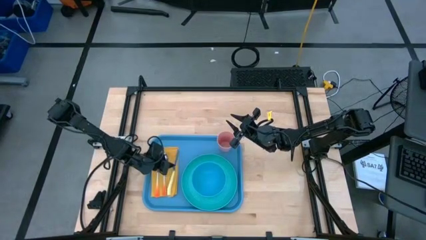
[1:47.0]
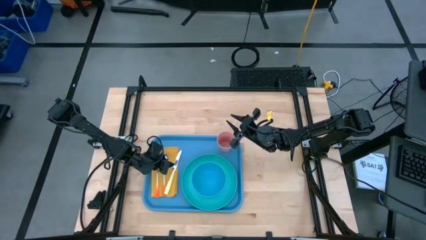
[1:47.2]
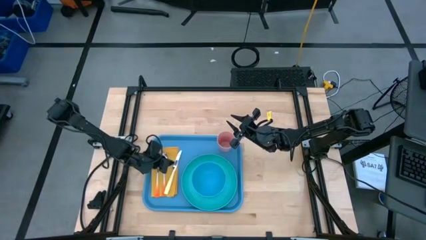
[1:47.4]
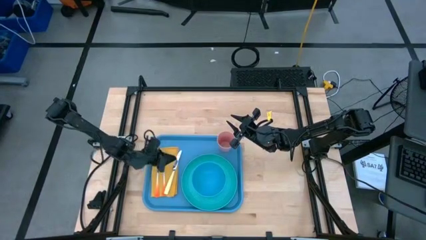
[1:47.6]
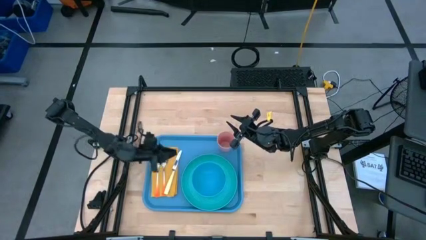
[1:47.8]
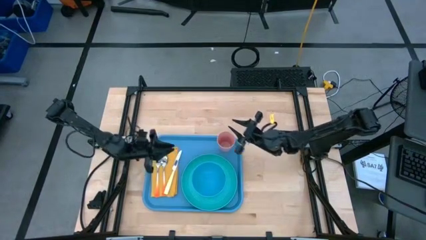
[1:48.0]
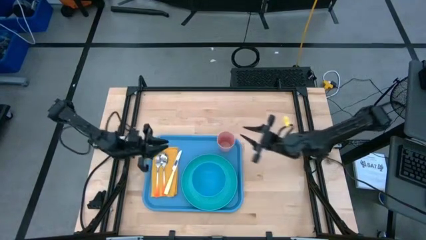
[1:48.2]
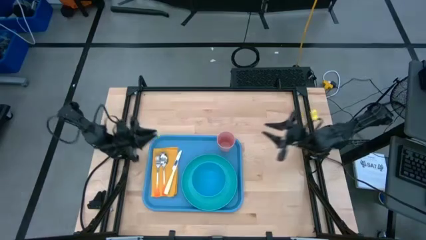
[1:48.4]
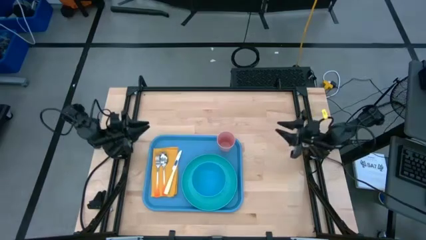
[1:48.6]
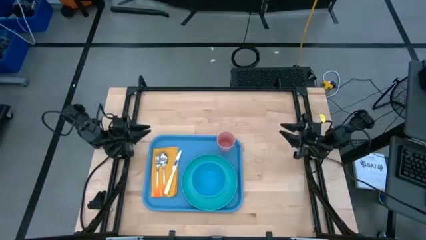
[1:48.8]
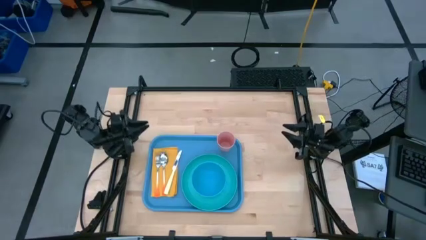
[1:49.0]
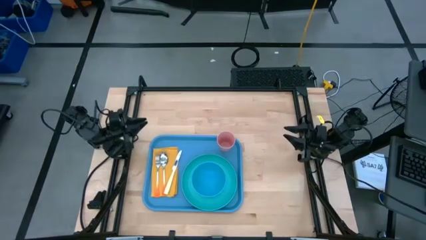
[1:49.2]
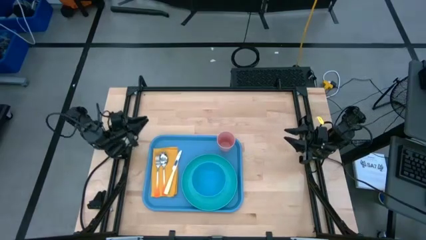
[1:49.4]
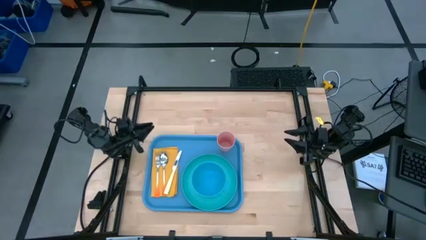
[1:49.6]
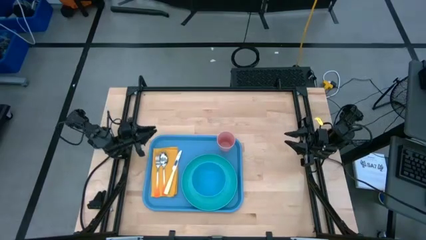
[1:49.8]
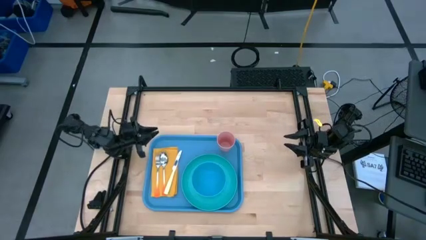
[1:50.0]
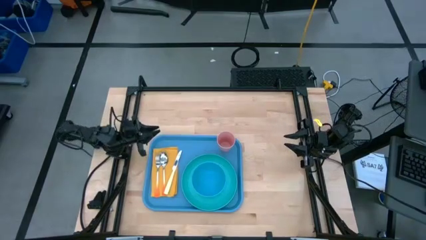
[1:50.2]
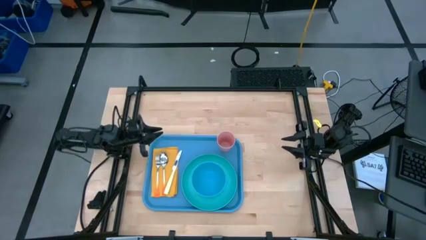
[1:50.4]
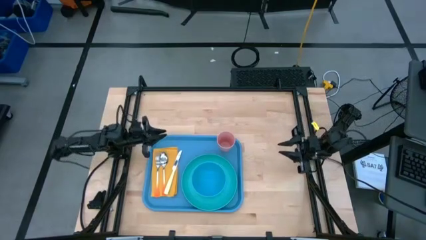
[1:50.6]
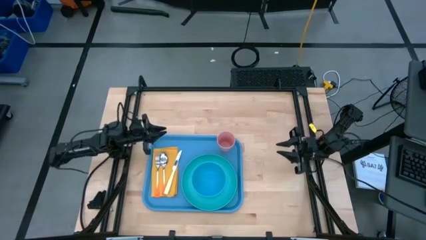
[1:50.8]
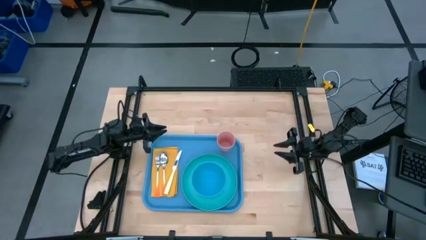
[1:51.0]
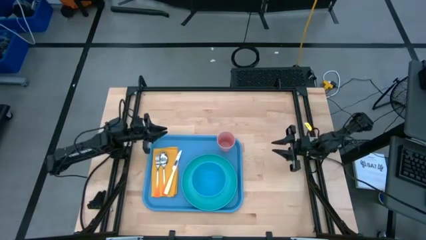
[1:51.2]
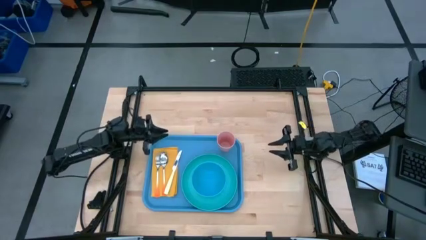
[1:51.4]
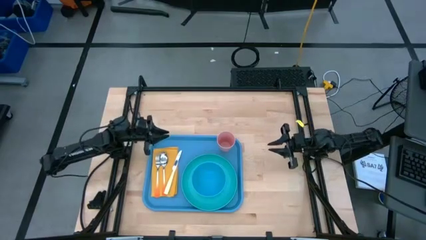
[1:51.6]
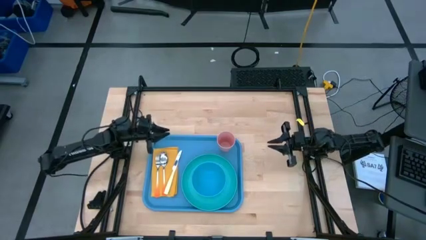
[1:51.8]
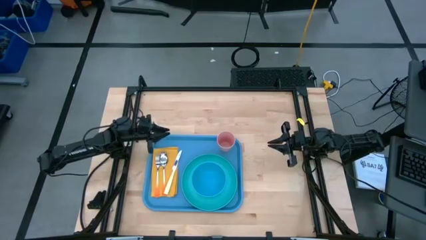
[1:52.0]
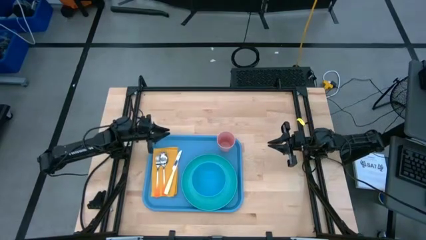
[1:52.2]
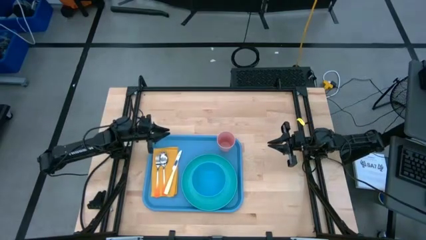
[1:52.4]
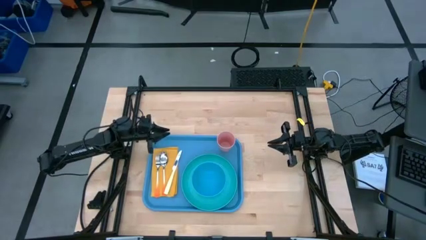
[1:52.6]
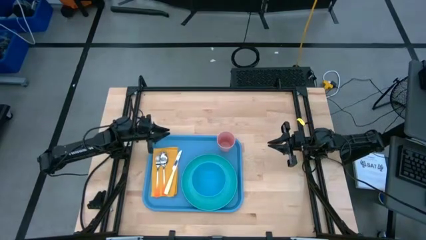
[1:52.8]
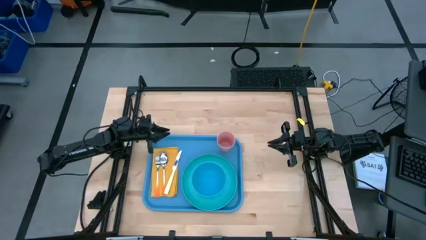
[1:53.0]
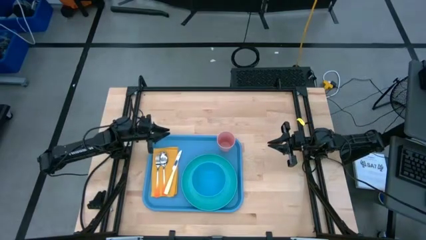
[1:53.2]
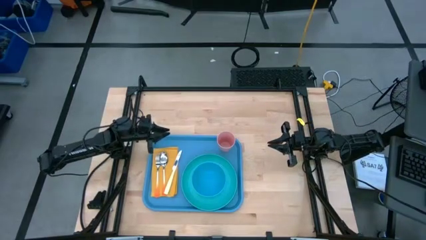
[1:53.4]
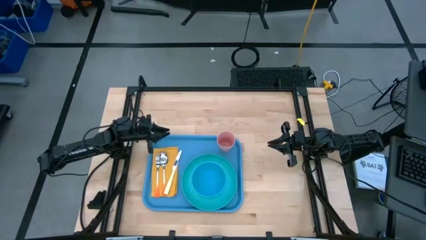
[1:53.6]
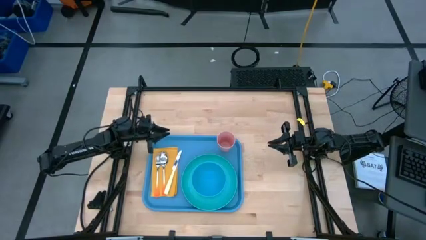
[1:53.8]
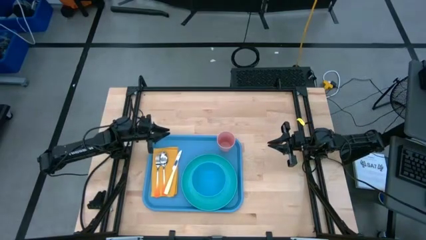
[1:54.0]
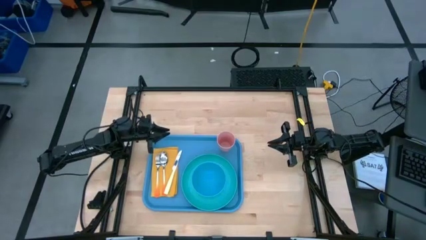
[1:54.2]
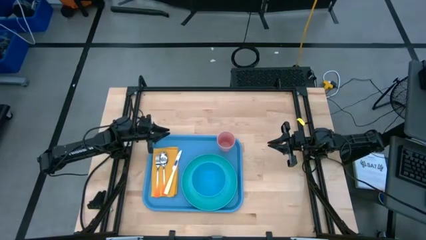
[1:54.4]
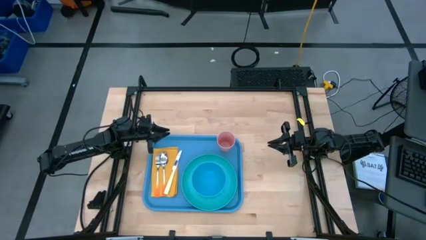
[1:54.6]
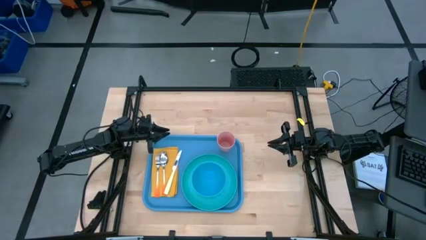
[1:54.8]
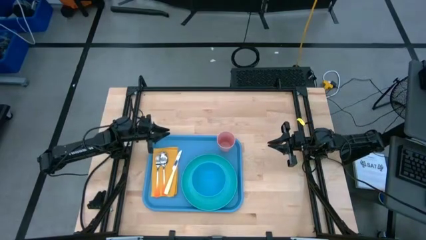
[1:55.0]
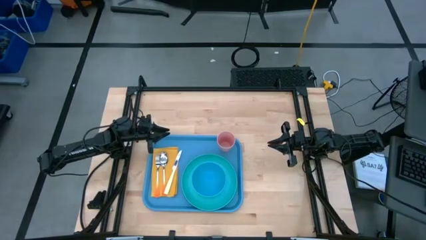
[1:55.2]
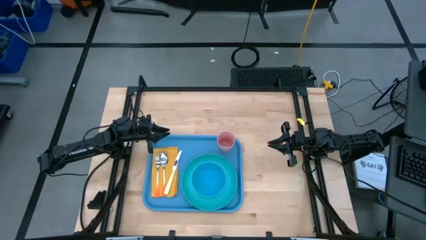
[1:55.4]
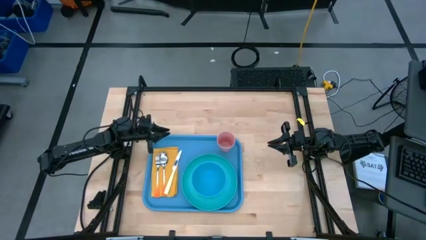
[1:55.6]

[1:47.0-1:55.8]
Task: Set up tray
Return to Home Position
